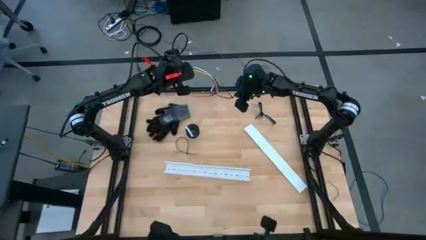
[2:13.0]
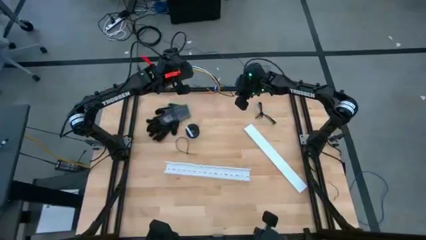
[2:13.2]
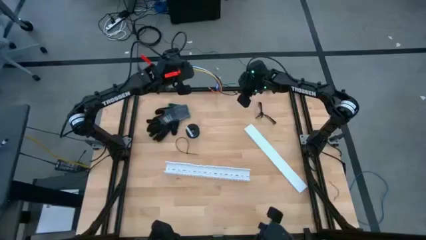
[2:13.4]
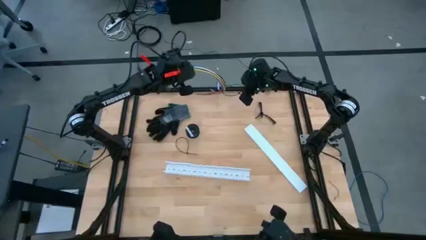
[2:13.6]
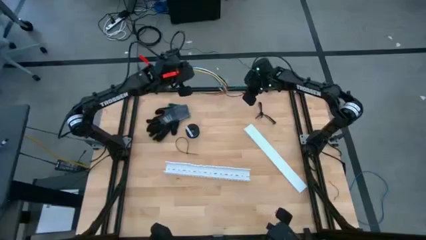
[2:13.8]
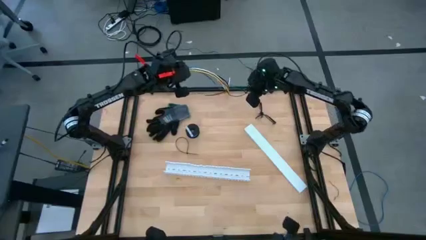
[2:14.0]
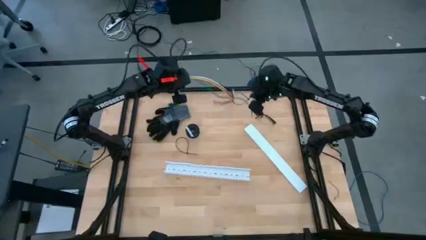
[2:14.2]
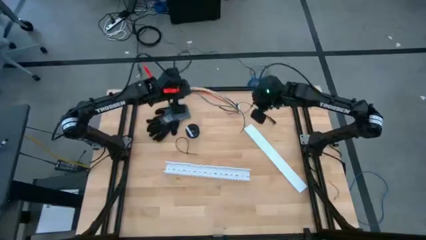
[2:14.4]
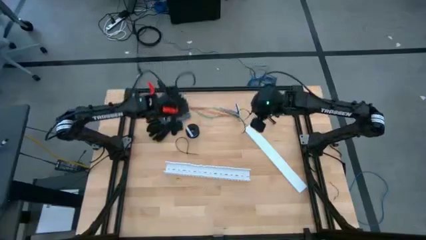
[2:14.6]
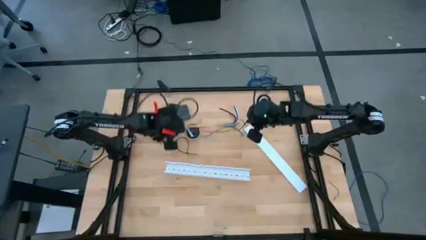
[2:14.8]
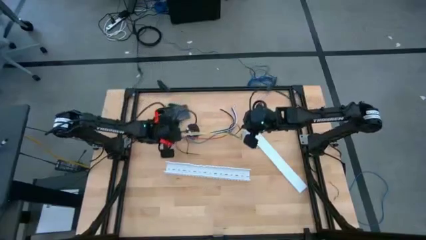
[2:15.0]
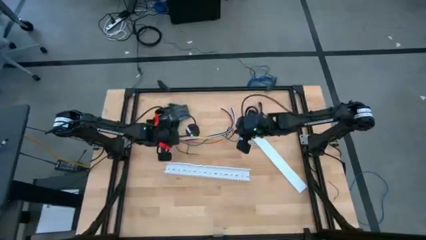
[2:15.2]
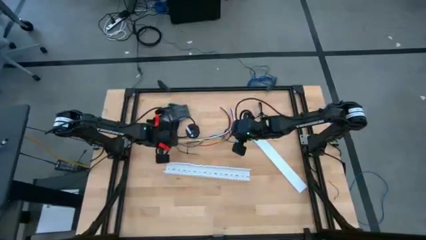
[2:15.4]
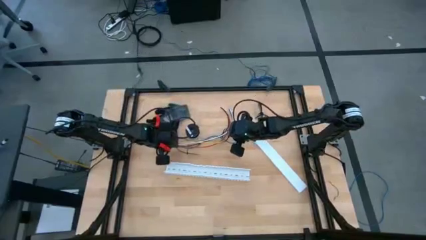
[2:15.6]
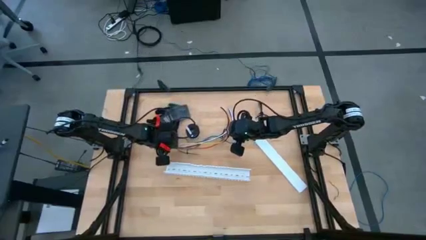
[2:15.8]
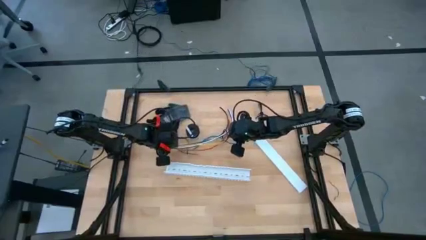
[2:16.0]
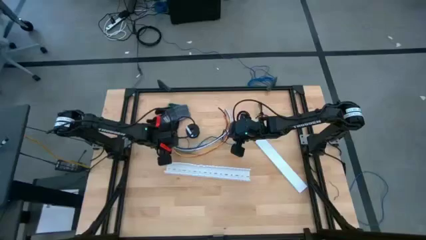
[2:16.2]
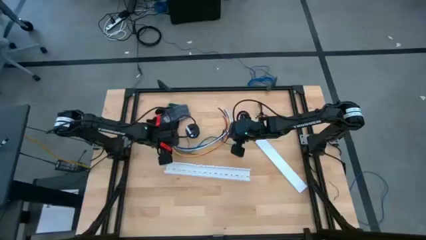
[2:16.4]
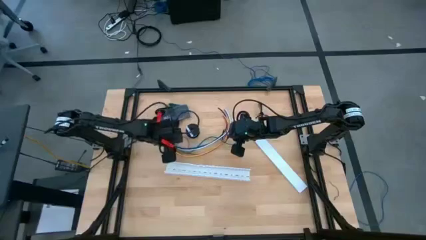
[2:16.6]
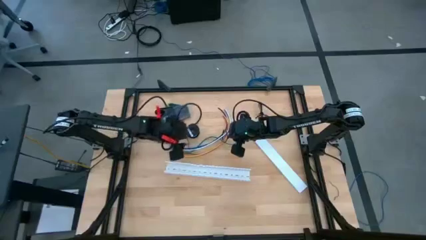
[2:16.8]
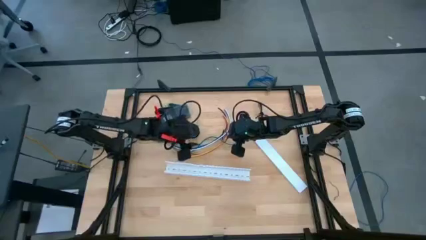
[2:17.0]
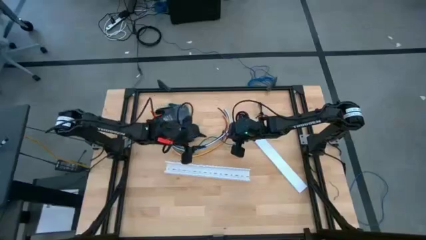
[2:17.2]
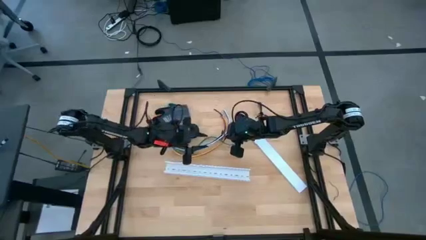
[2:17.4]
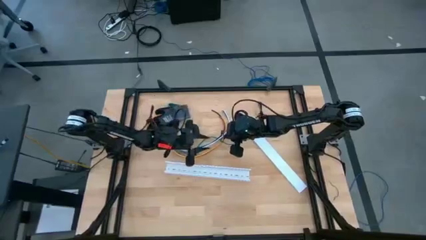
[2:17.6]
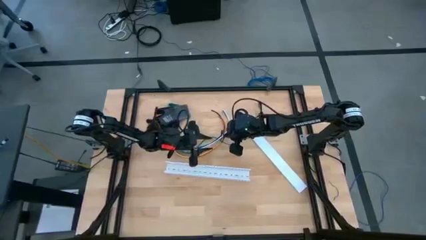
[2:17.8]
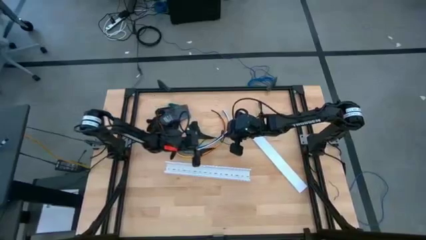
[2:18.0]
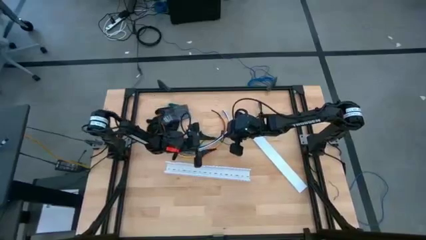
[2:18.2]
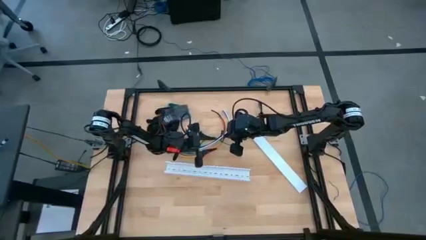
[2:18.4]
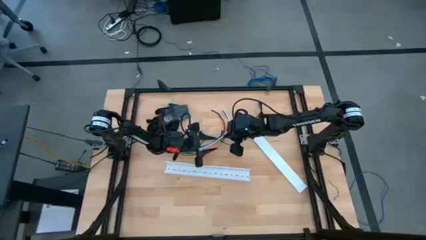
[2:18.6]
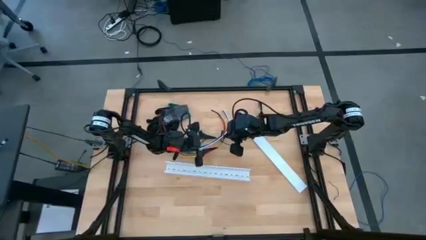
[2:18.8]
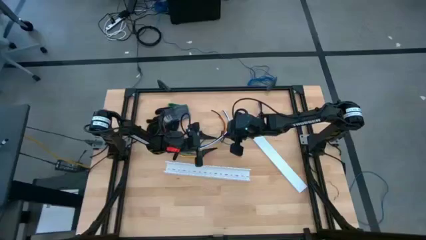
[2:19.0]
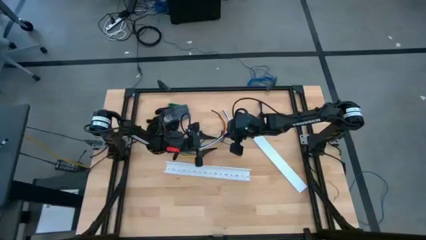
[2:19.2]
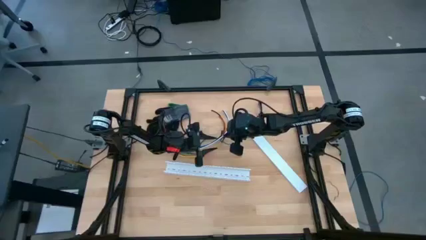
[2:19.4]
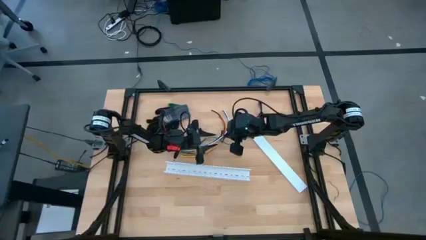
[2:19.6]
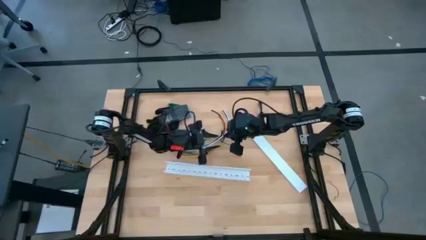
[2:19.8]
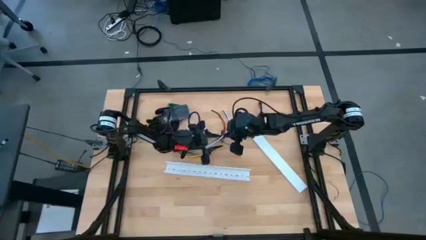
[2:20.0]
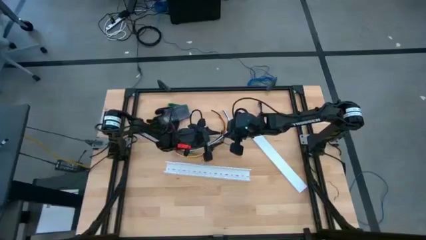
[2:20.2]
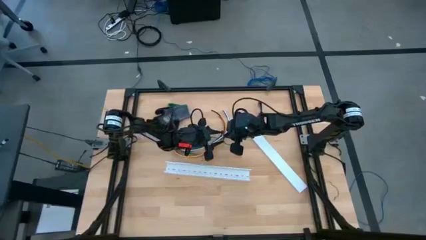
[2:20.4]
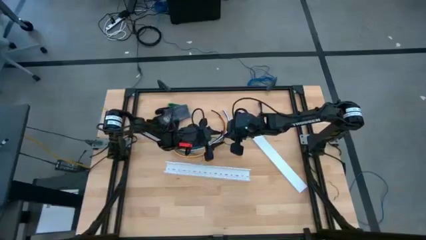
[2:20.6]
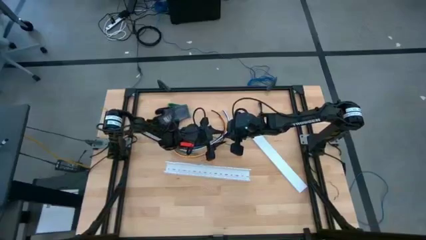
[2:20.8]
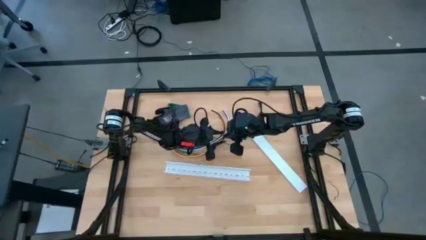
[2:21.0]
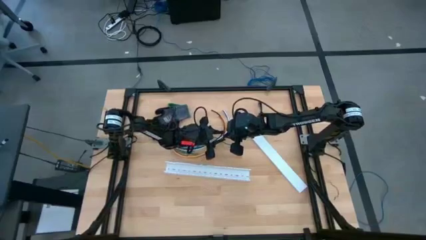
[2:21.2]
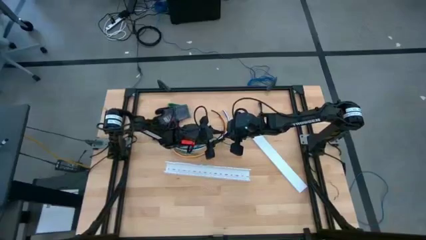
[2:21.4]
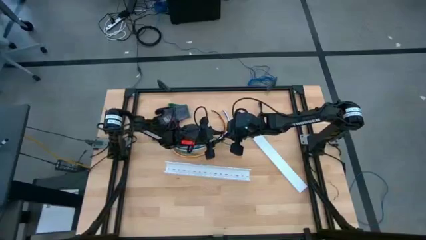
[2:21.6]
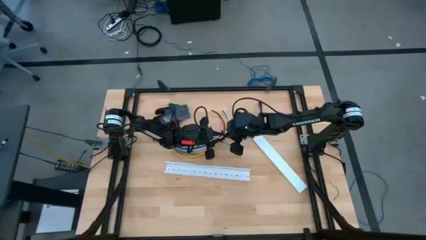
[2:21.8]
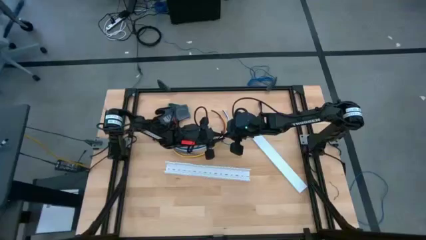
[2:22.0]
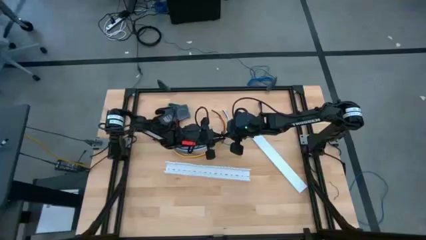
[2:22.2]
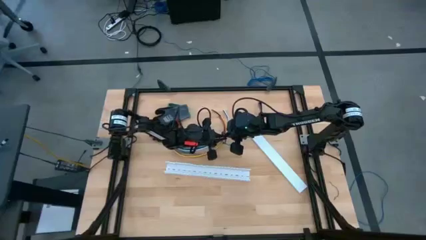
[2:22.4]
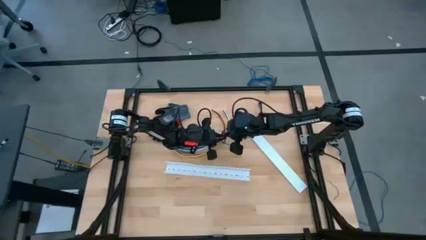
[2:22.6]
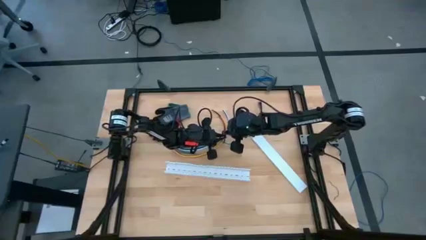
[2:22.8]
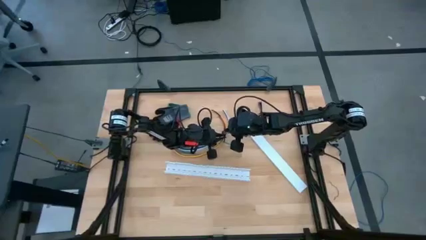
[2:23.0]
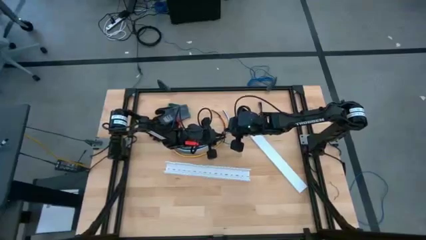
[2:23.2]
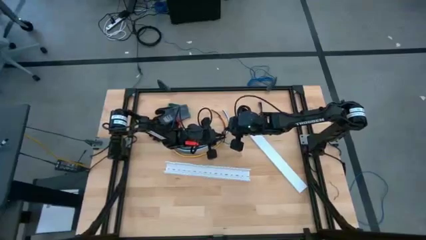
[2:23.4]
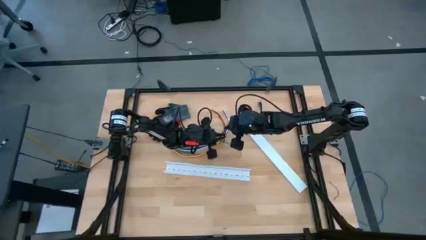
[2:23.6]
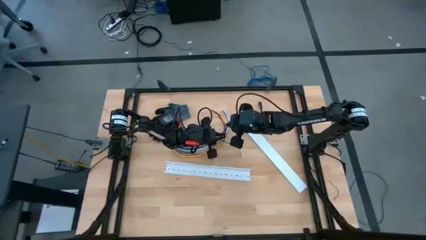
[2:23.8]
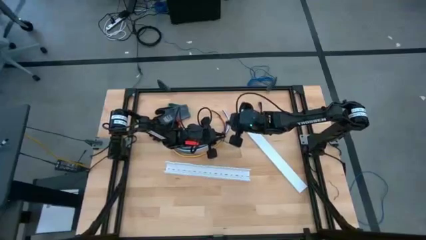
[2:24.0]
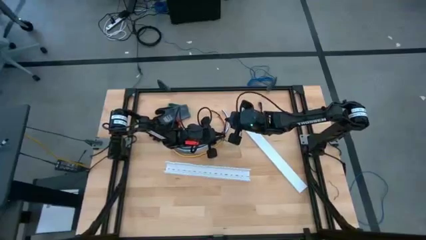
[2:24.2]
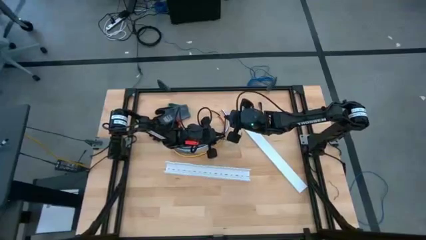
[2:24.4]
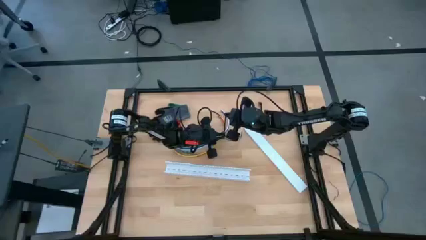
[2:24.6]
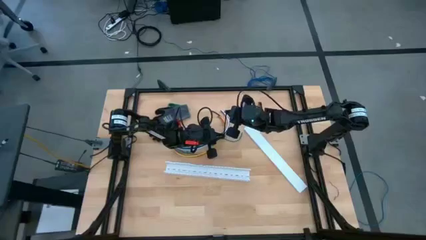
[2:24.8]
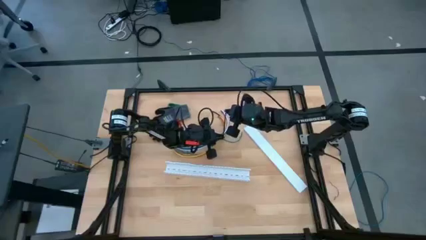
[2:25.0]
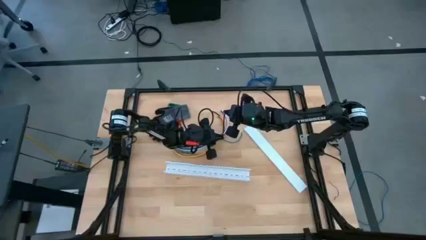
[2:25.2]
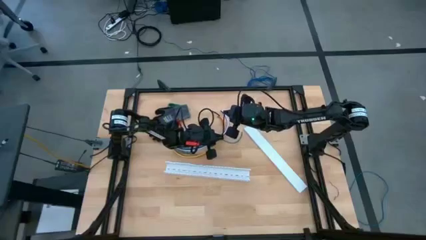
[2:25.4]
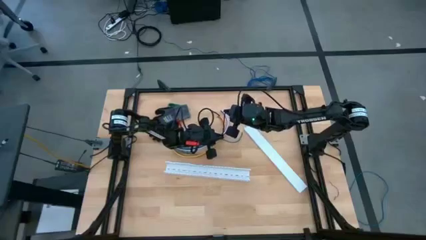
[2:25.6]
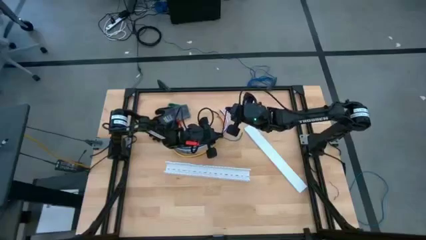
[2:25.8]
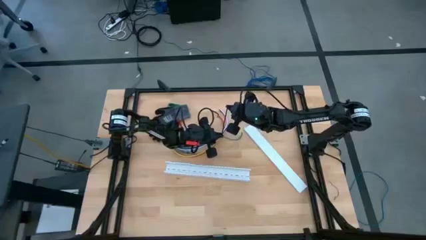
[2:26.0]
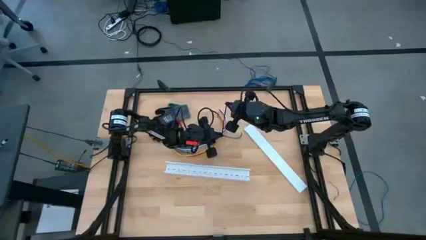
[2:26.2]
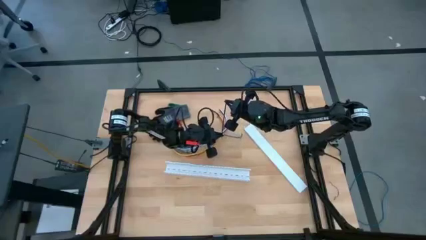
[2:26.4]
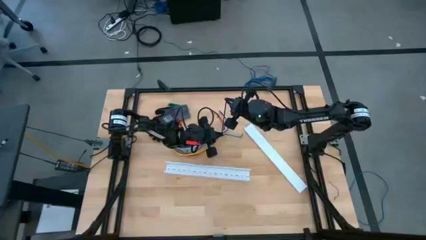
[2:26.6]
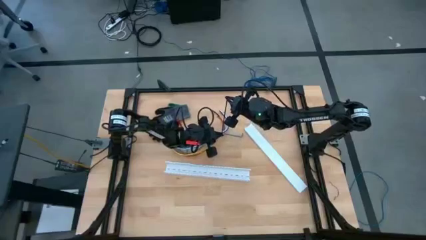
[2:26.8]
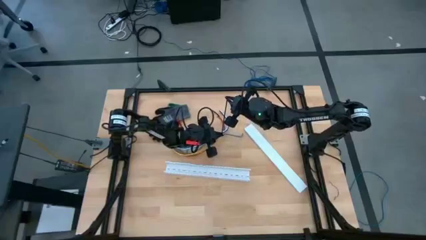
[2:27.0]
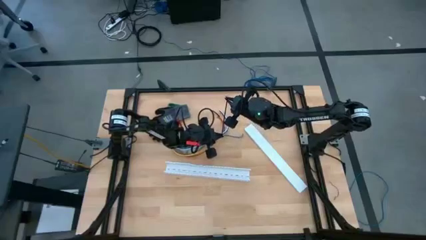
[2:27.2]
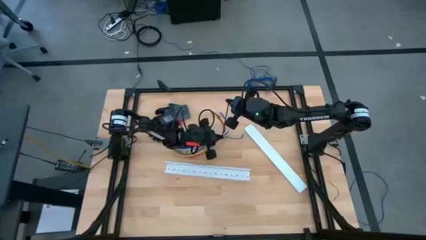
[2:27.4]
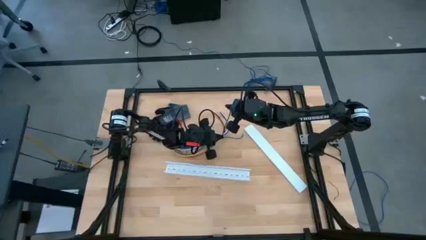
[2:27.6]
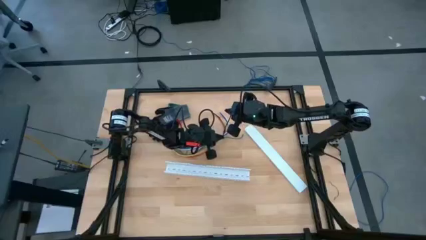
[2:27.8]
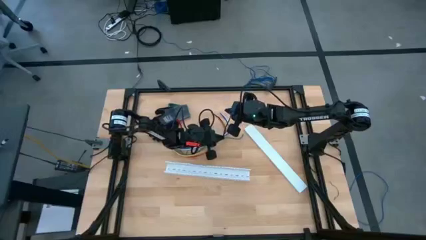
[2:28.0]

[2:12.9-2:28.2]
Task: Ziptie cables
Wrap the cable wires with the black zip tie
